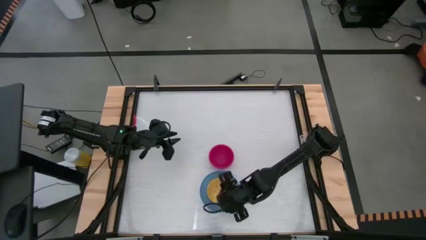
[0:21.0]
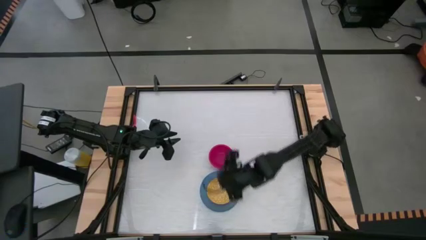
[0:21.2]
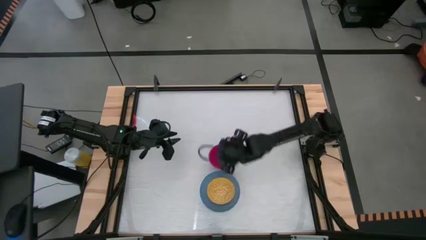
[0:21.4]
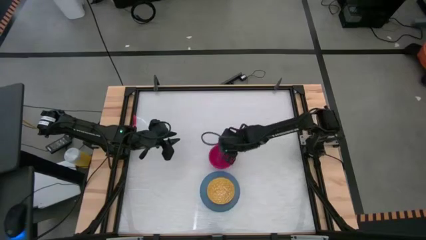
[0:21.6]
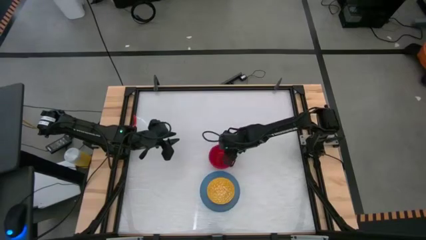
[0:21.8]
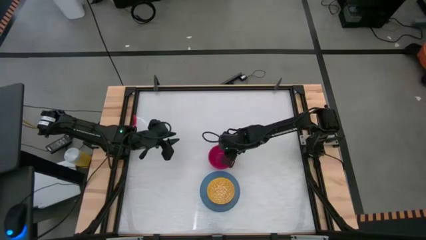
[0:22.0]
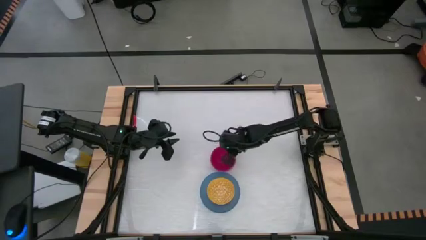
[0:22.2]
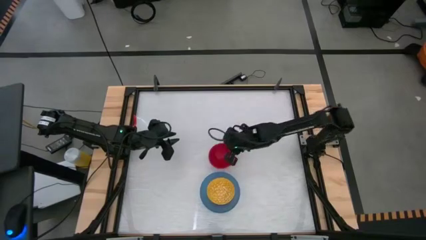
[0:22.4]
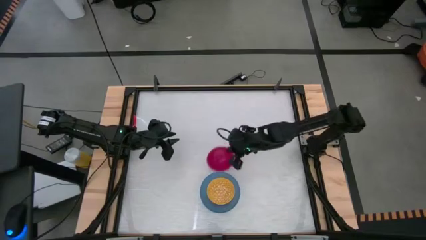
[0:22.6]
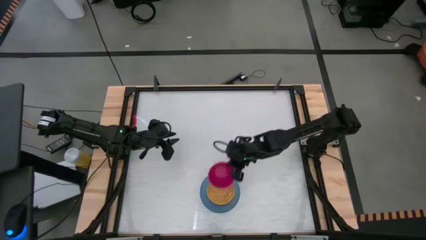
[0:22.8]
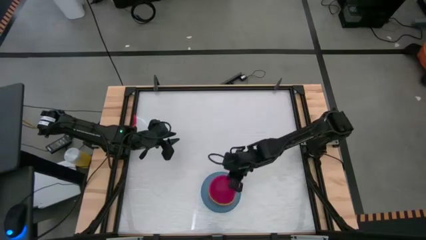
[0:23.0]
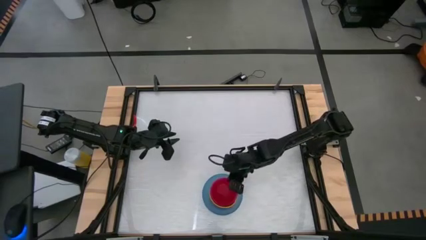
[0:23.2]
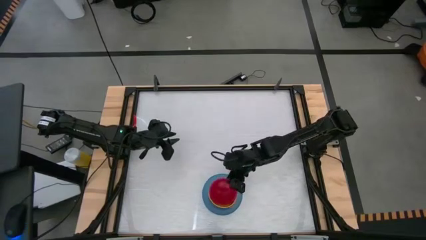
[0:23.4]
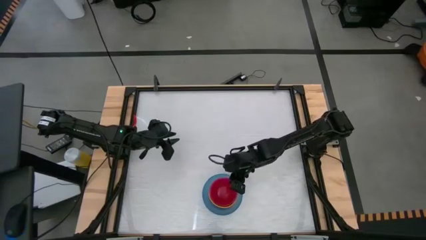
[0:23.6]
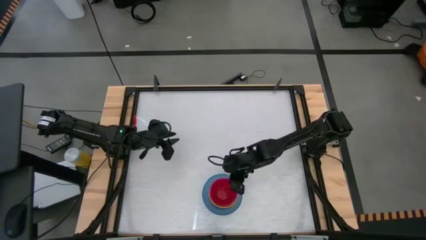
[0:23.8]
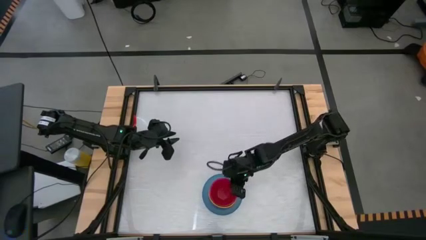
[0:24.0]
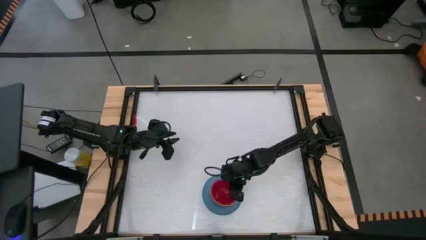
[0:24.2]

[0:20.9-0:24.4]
Stack the red bowl on top of the yellow bowl

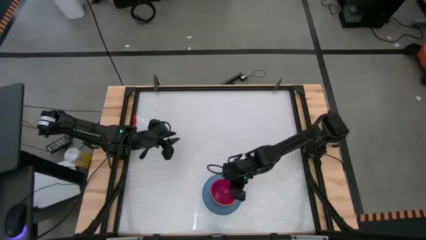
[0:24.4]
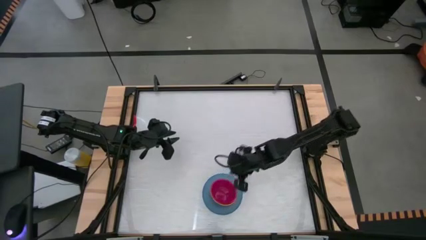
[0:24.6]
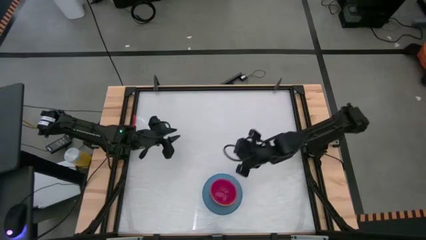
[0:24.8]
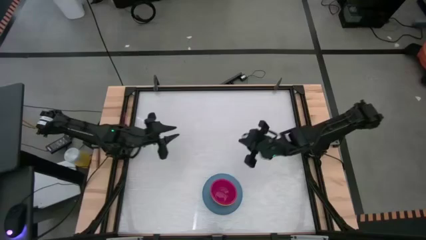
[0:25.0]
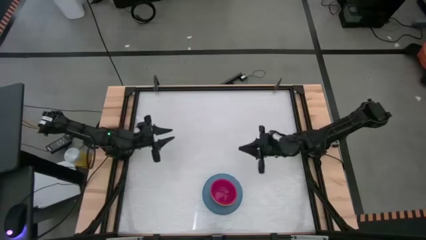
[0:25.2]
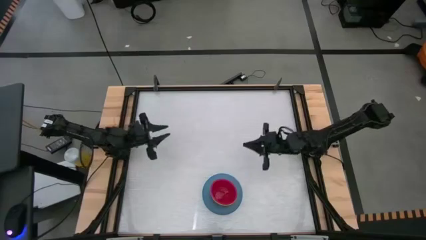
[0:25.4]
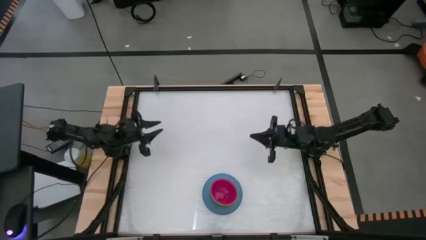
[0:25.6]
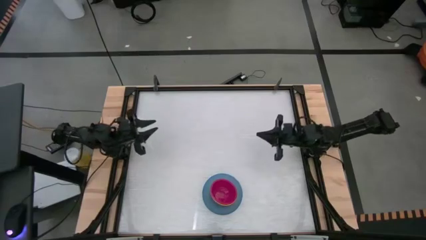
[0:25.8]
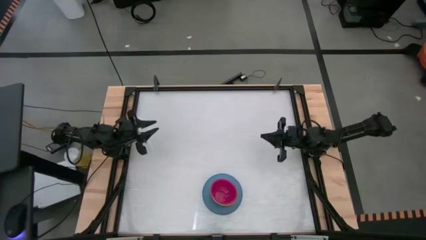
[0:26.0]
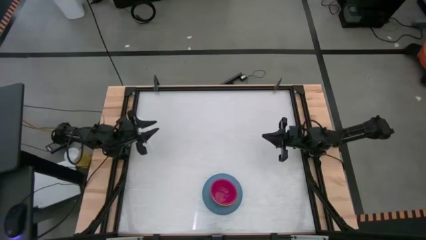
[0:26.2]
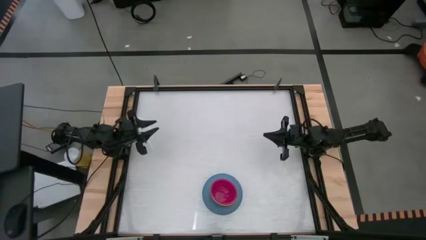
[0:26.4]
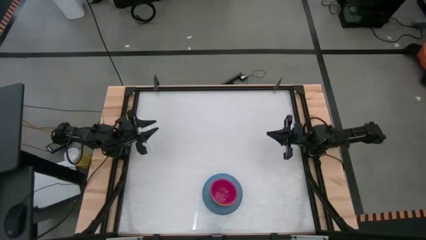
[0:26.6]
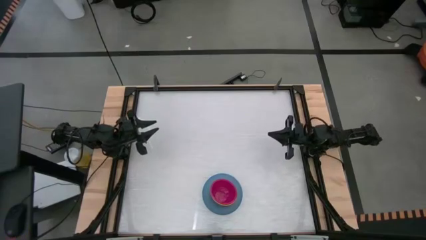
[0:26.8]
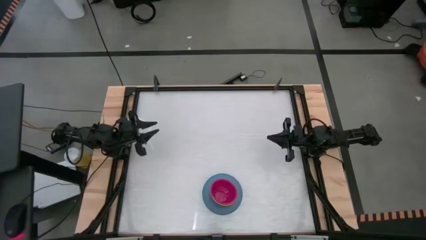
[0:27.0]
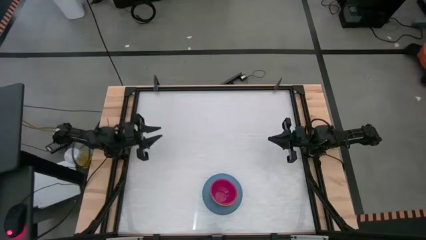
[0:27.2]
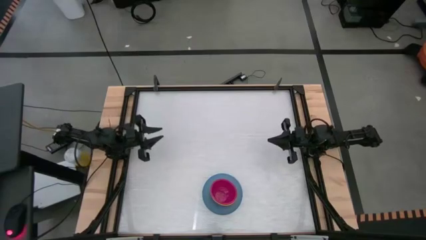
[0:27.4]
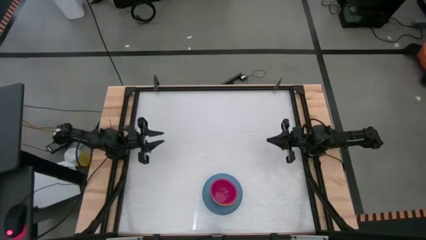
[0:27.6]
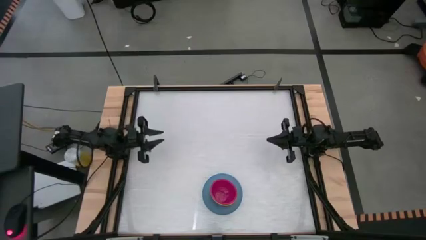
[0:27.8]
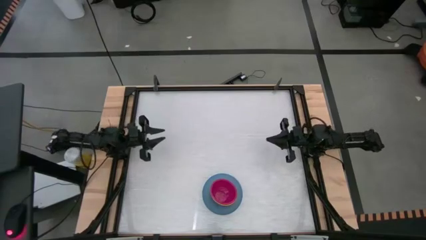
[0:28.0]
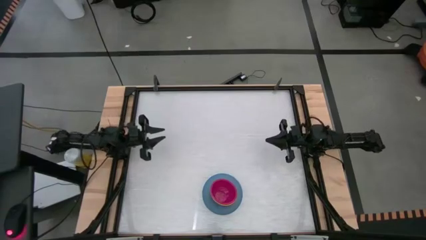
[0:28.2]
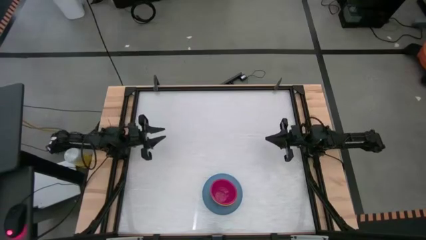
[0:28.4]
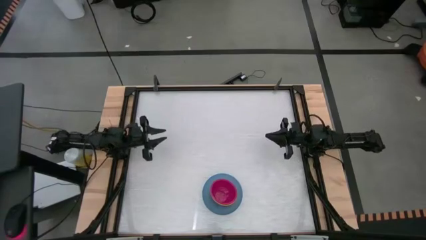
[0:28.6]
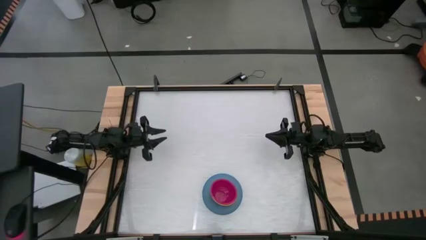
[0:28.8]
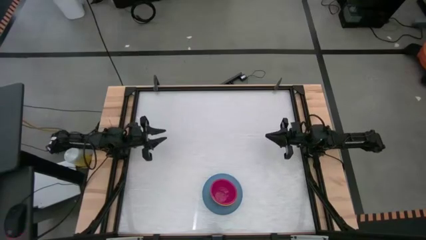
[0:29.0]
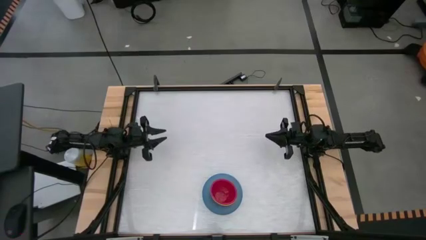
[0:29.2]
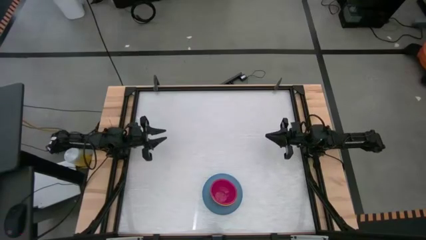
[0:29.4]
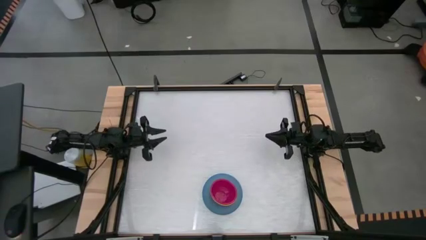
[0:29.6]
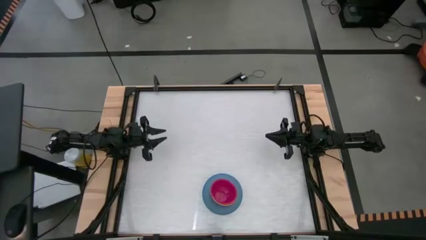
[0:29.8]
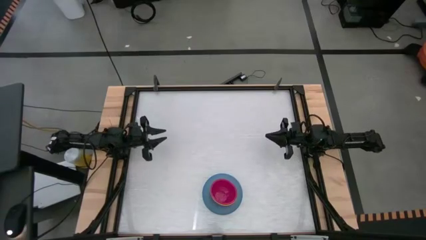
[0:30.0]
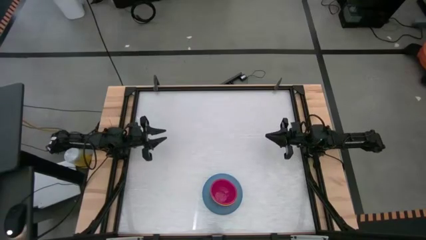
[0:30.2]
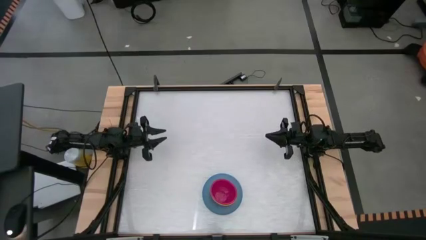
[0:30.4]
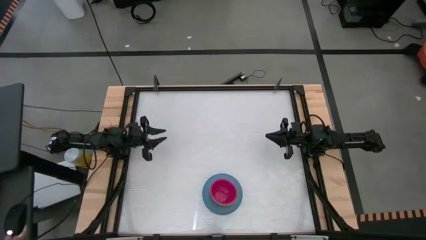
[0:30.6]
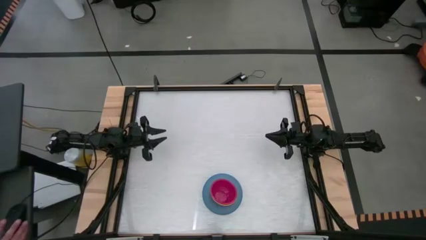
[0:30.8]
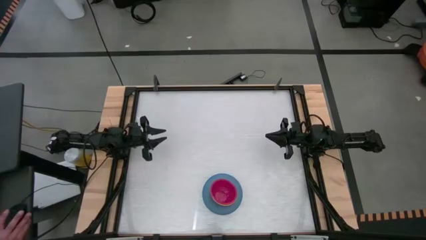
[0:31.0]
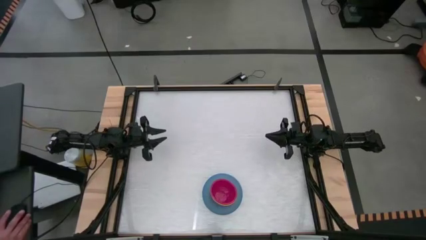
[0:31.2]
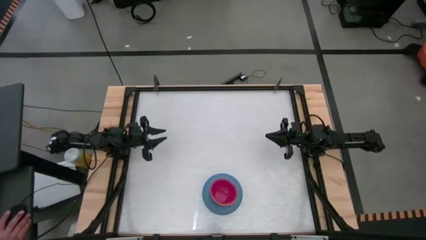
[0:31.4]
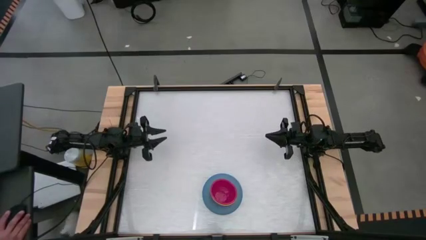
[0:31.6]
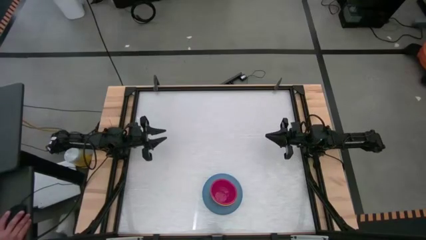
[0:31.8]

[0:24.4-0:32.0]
Return To Home Position
